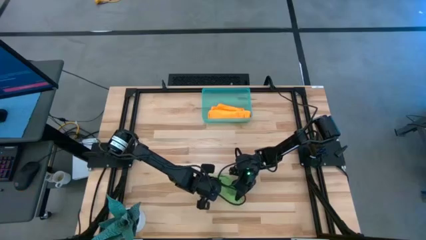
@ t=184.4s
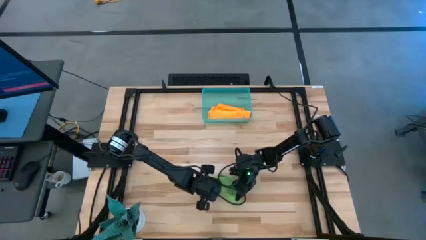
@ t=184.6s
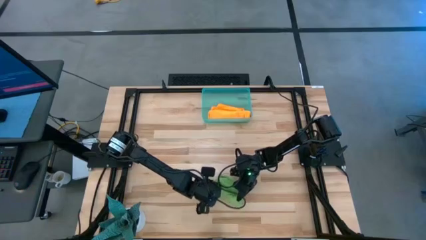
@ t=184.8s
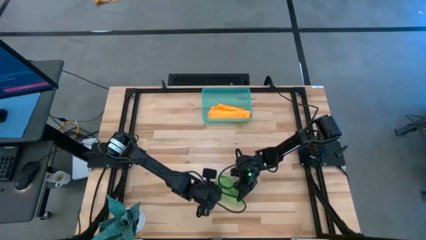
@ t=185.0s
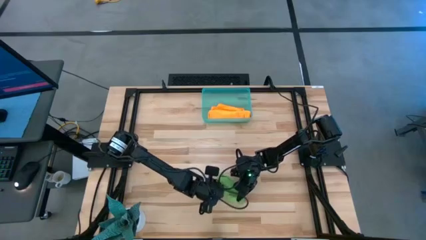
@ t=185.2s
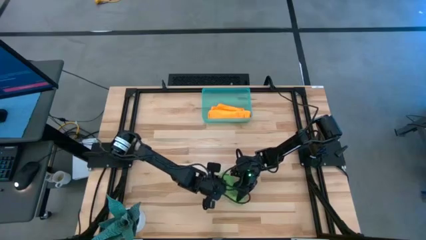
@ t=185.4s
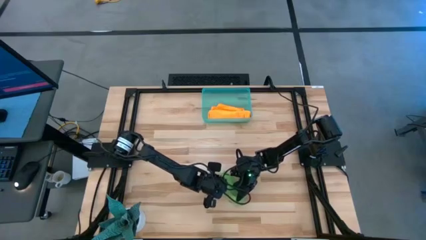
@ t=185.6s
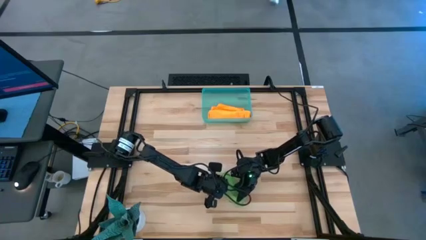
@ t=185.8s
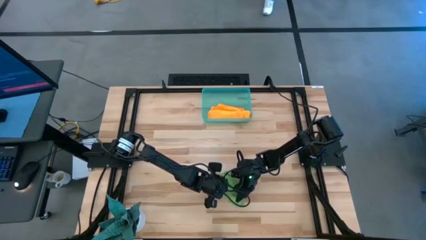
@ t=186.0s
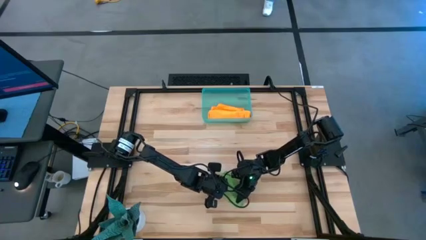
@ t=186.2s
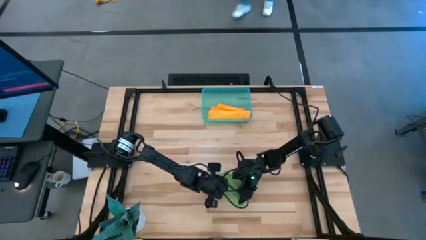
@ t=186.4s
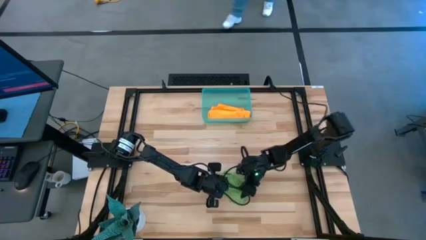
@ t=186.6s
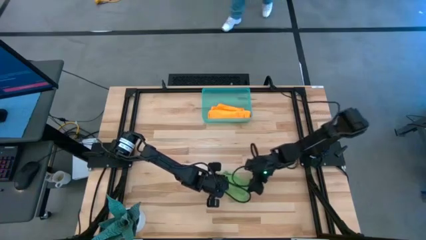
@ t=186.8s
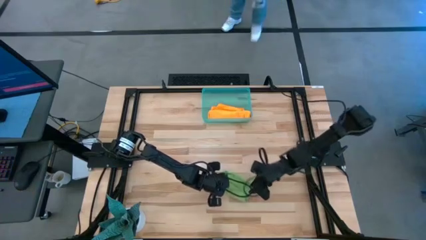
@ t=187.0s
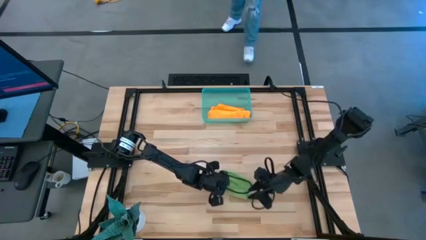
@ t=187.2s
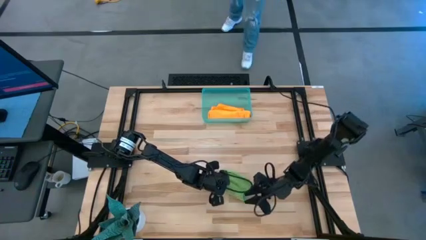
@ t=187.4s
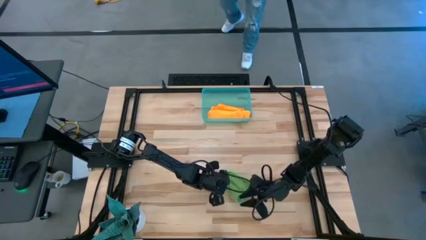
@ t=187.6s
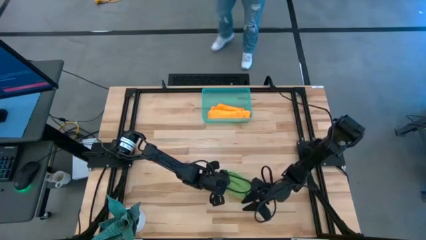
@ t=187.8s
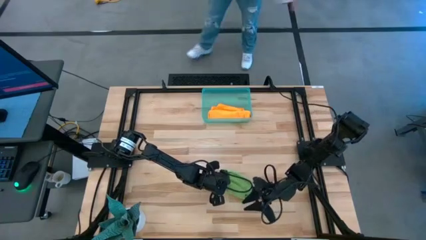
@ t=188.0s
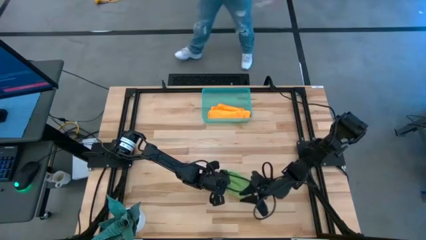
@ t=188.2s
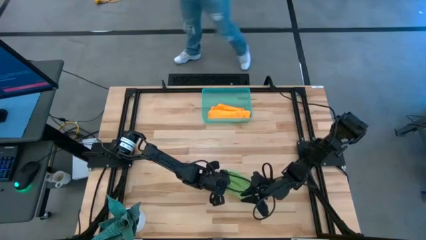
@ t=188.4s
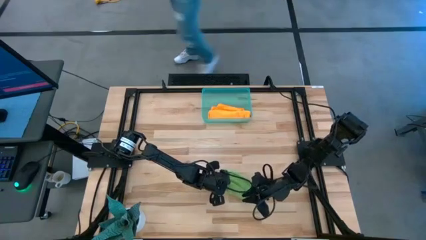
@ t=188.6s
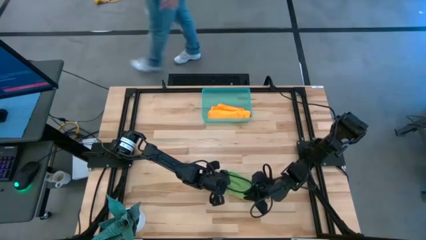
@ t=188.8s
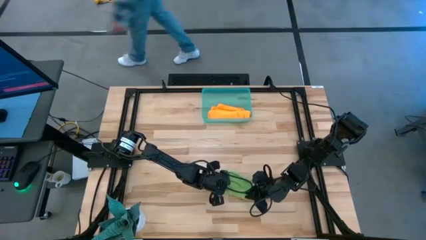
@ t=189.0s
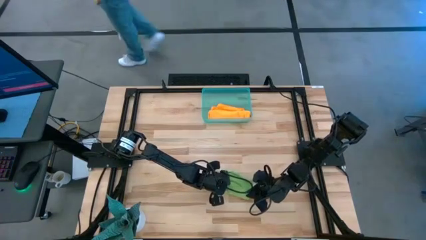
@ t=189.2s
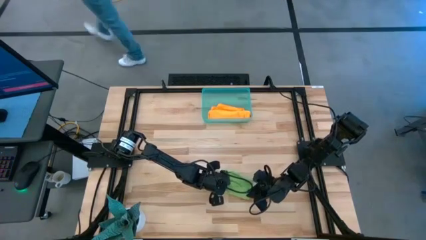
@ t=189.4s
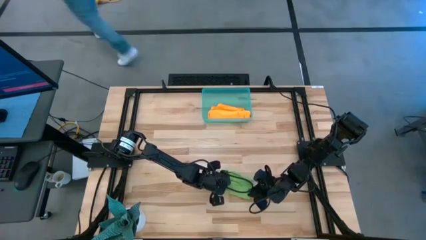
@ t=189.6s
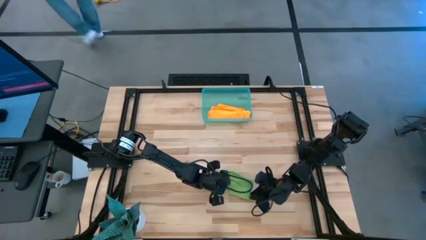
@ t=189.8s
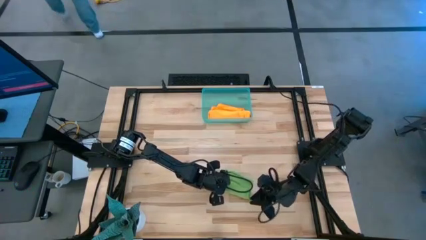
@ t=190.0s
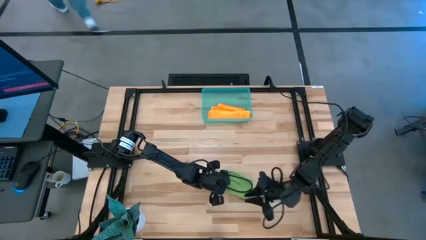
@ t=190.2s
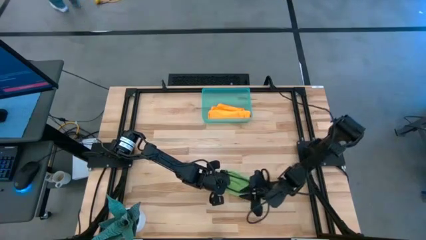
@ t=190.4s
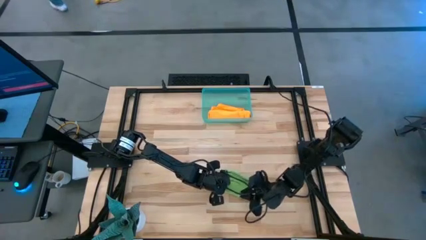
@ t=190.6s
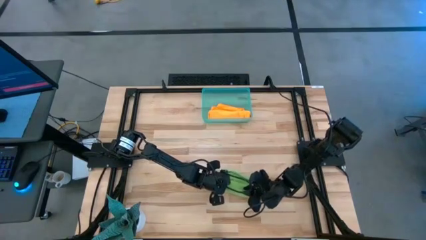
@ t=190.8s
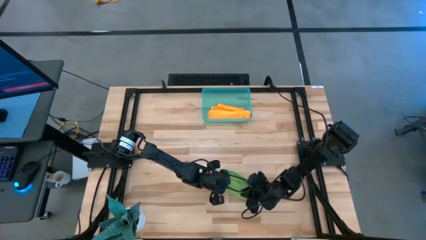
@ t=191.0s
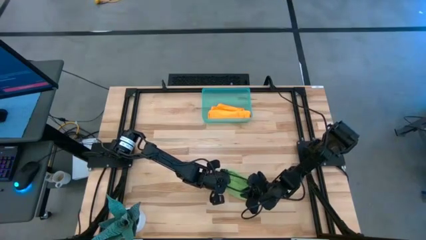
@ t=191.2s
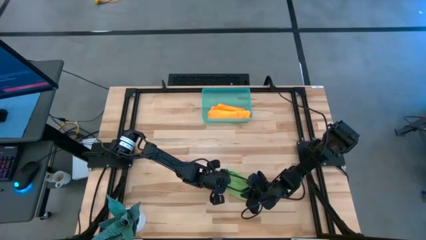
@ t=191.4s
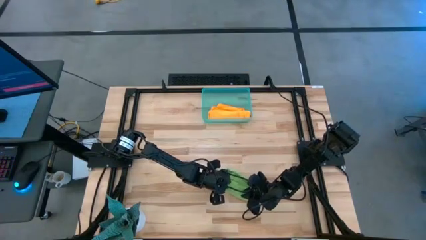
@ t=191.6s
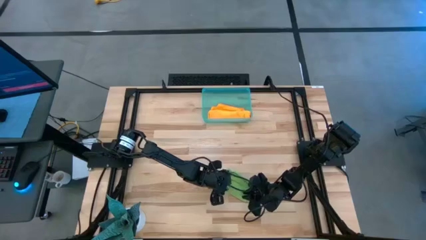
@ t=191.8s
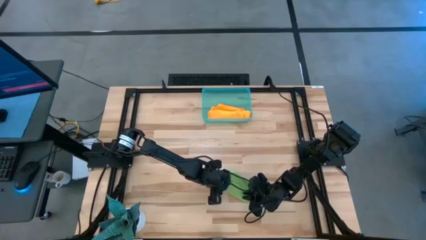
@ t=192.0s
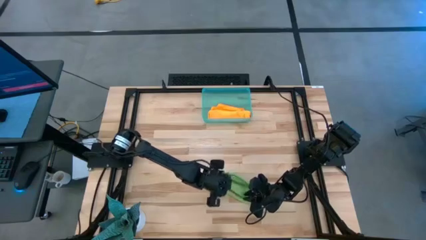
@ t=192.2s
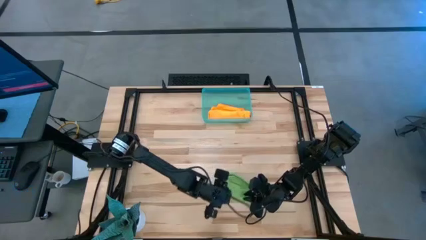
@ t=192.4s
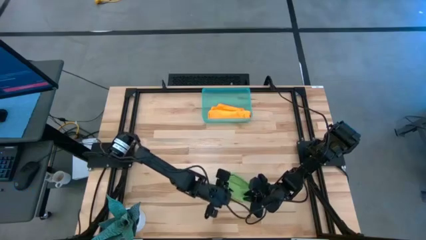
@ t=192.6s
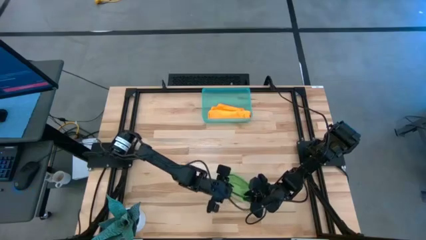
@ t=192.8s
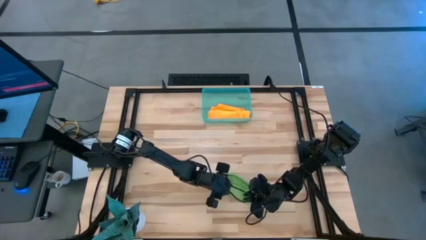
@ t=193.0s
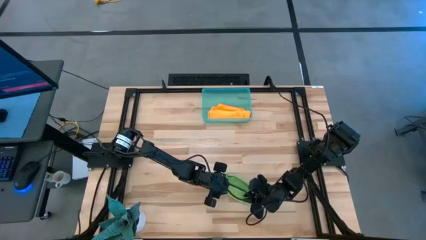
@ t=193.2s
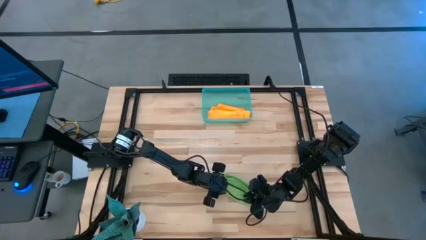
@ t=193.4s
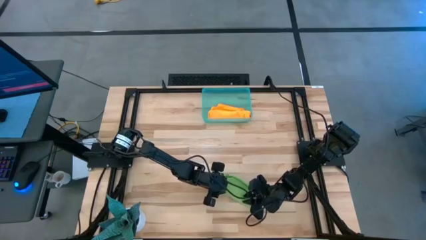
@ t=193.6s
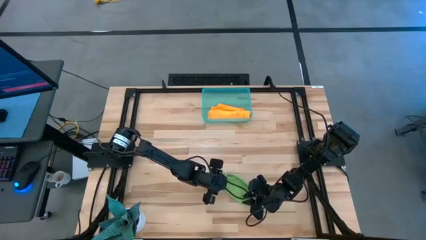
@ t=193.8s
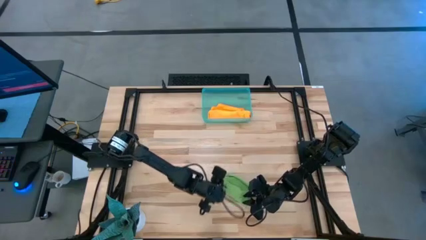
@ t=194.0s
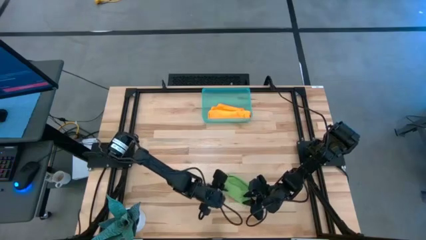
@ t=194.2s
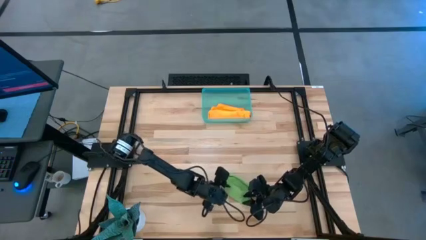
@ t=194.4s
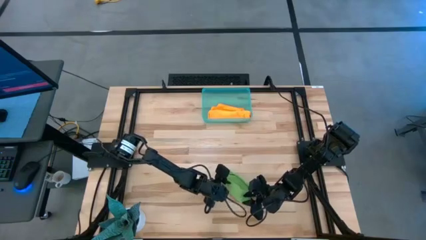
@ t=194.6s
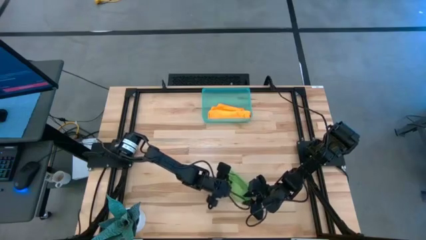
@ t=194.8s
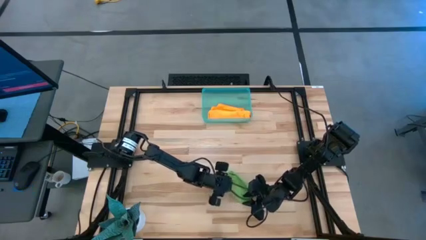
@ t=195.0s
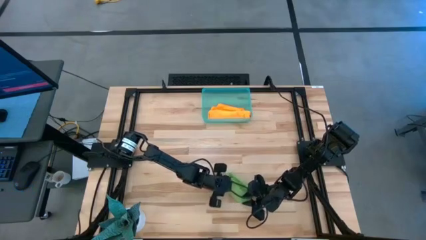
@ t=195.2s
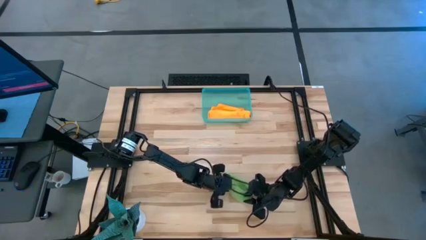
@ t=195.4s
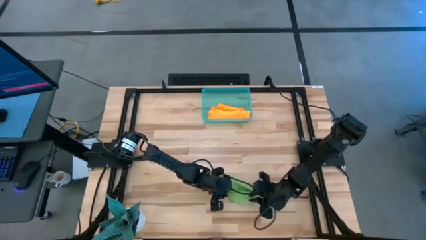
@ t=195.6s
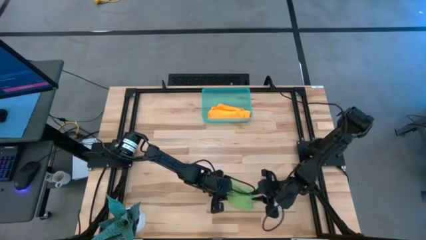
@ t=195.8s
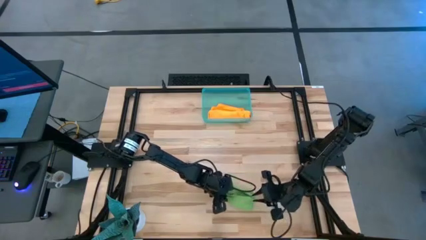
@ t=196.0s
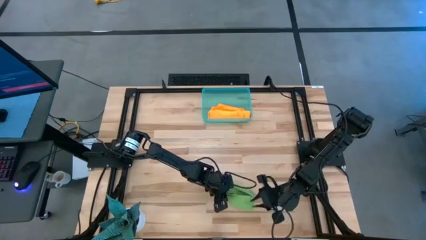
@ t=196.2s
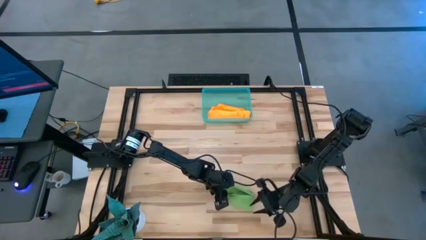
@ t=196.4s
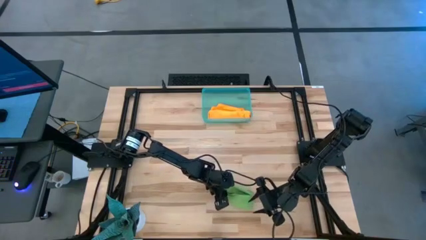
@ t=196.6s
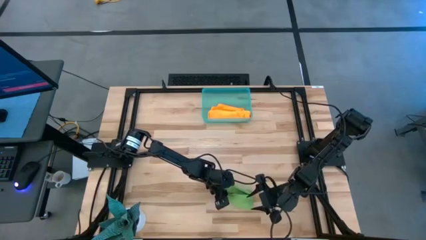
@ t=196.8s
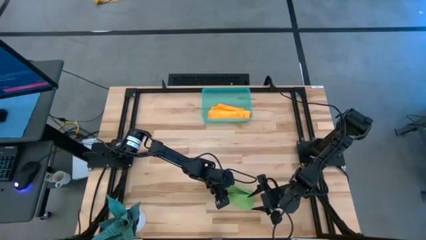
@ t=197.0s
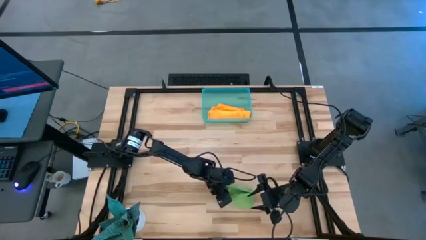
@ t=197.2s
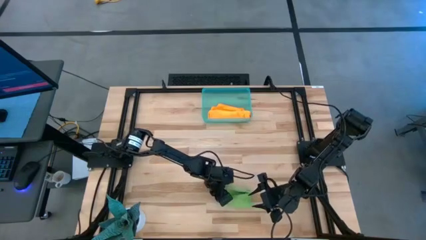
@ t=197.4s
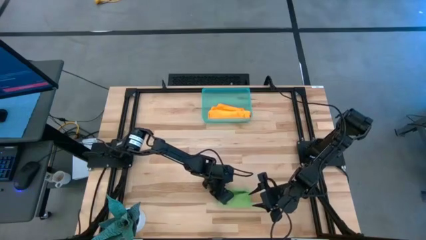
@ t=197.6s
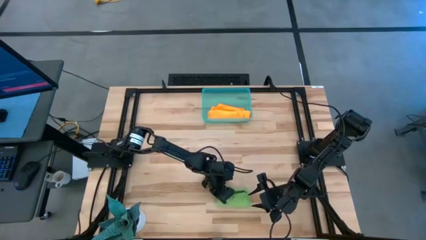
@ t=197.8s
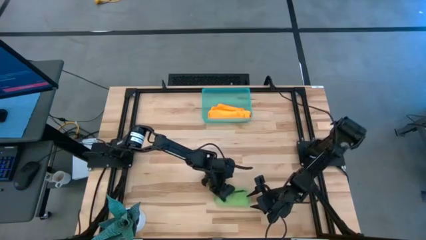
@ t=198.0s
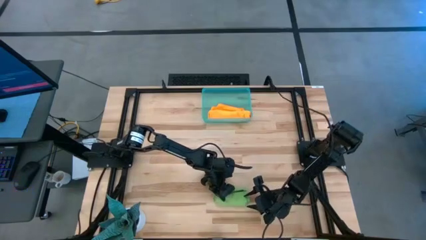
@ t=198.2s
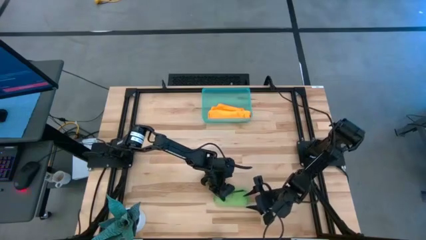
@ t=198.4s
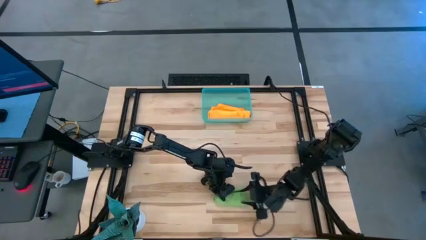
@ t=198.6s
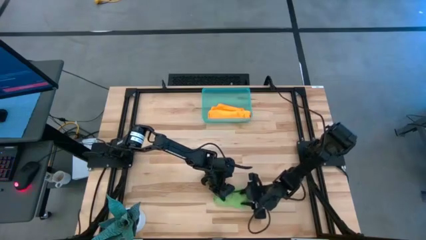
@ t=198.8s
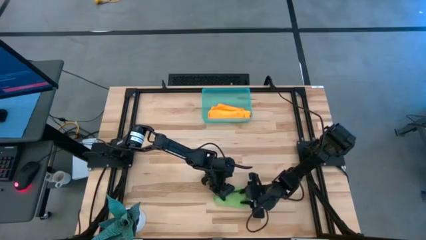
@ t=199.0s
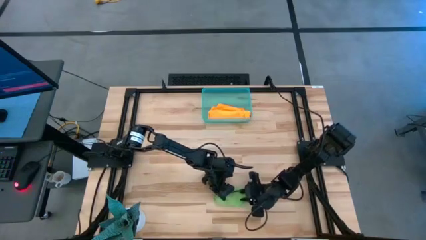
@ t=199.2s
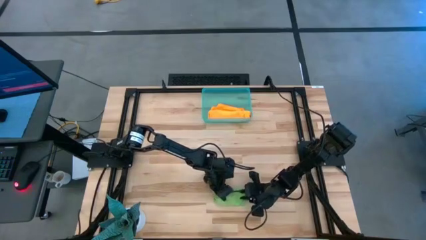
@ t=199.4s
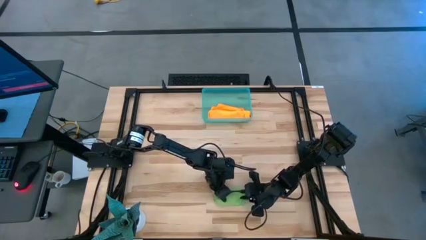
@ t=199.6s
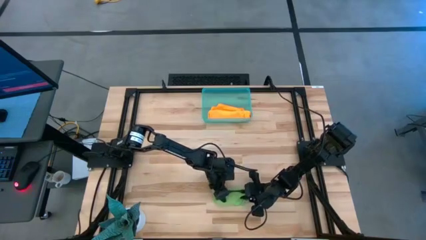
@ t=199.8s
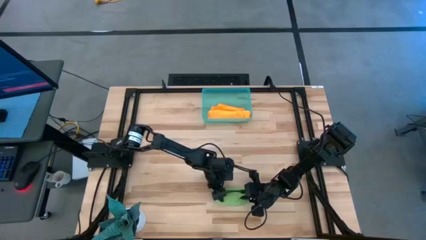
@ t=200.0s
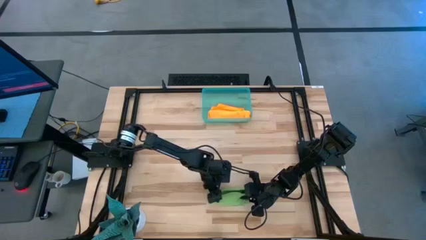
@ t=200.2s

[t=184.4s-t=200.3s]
Task: Roll microfiber towels into tight, uniform cylinder then place into a basket
Roll the green microfiber towel
